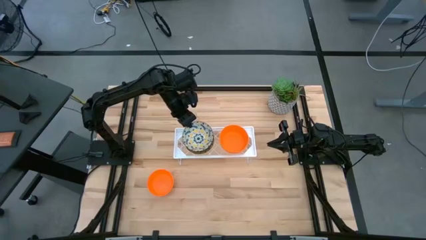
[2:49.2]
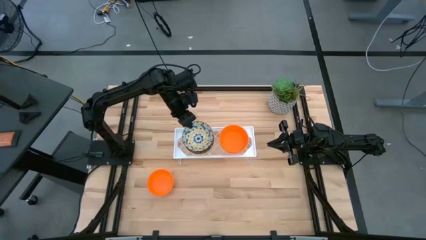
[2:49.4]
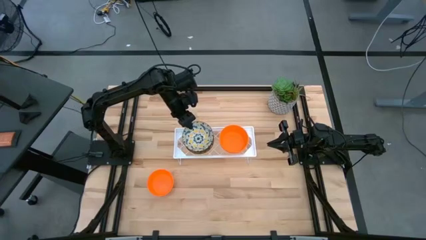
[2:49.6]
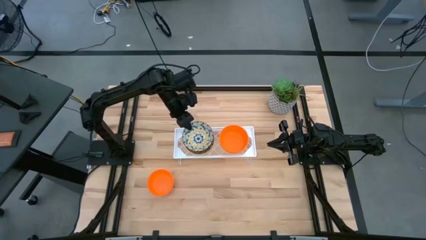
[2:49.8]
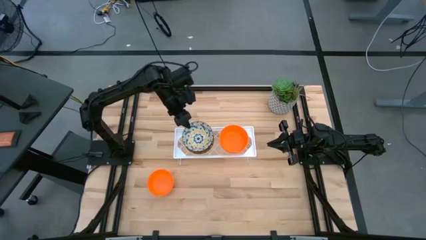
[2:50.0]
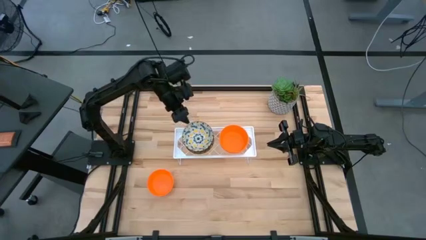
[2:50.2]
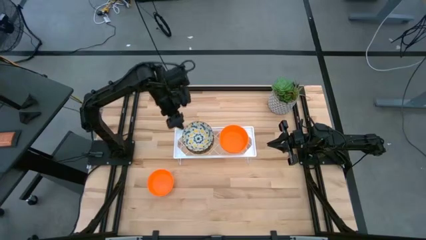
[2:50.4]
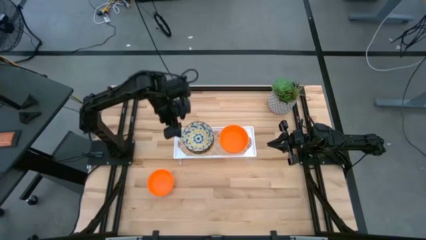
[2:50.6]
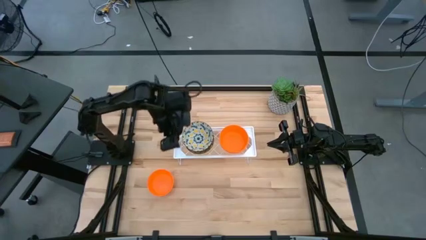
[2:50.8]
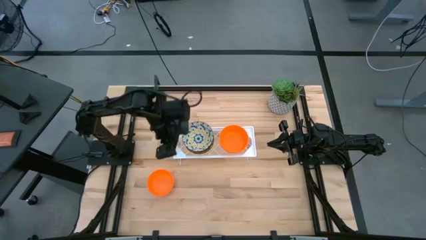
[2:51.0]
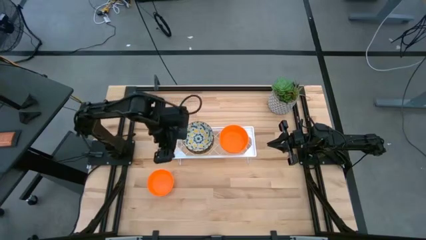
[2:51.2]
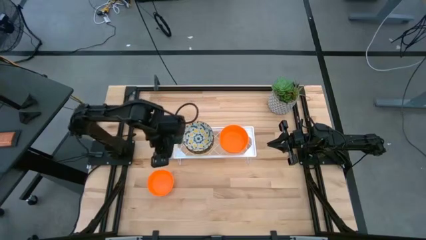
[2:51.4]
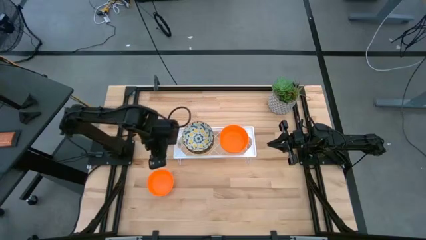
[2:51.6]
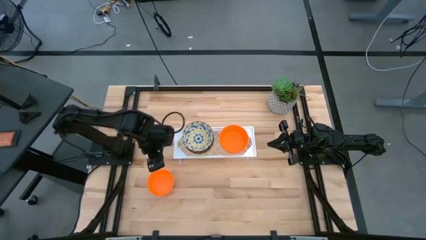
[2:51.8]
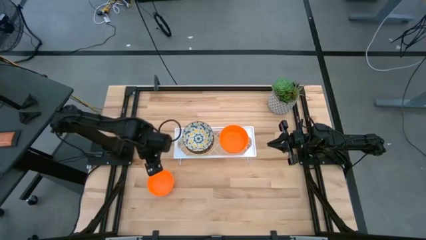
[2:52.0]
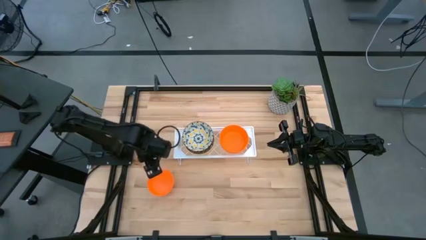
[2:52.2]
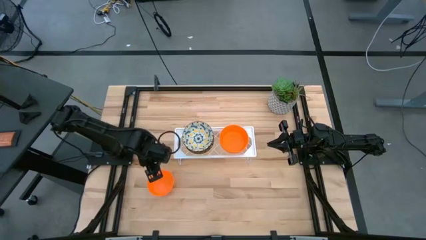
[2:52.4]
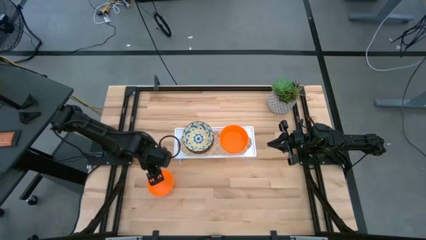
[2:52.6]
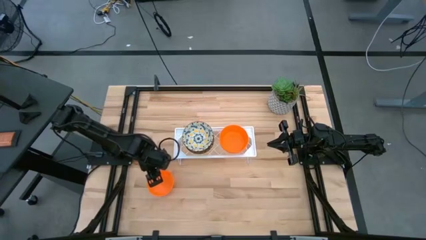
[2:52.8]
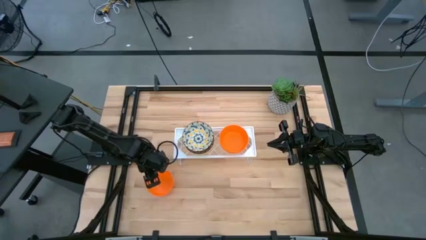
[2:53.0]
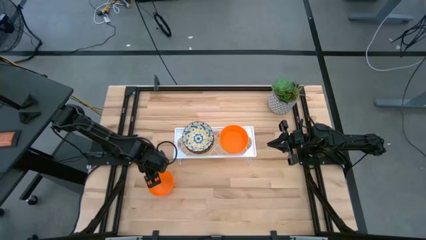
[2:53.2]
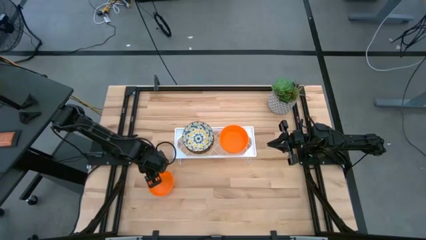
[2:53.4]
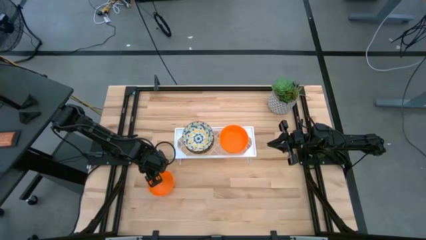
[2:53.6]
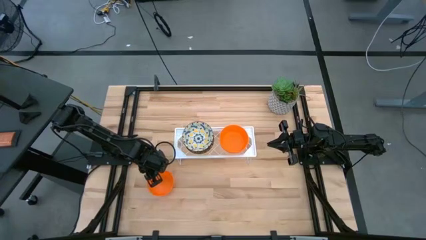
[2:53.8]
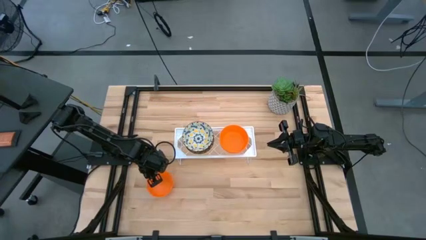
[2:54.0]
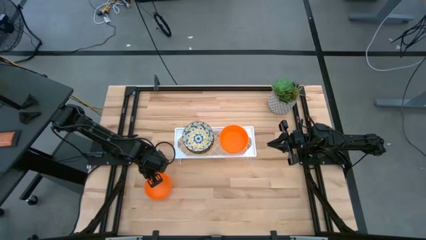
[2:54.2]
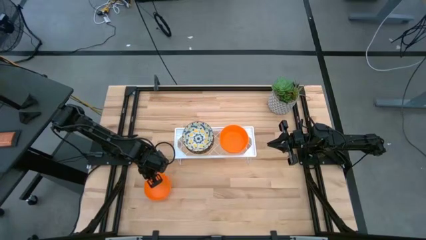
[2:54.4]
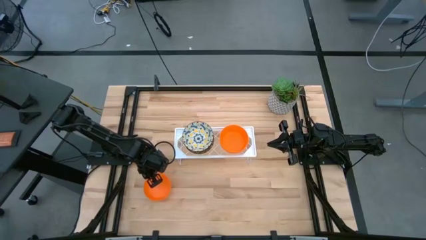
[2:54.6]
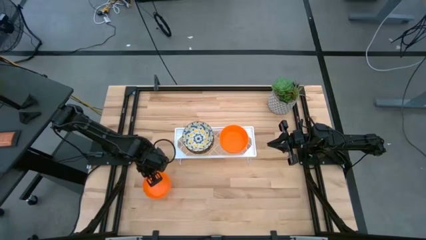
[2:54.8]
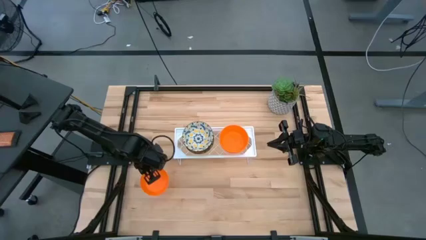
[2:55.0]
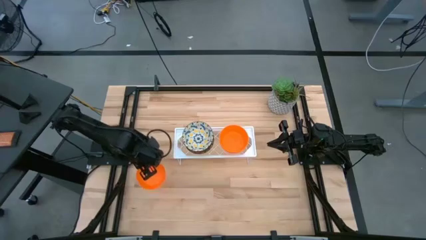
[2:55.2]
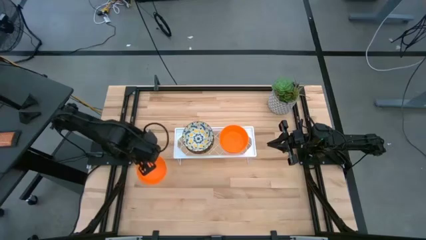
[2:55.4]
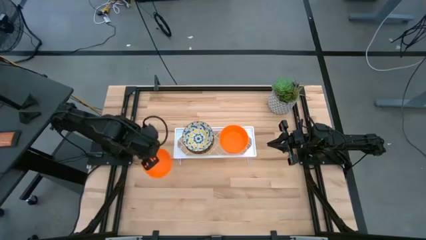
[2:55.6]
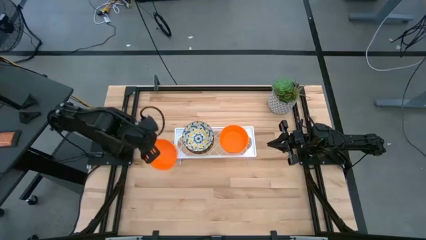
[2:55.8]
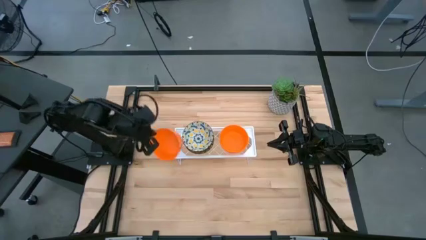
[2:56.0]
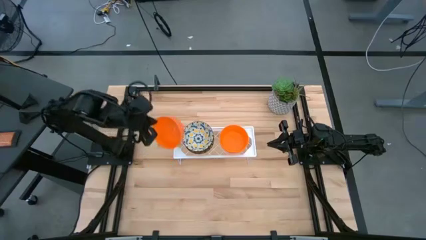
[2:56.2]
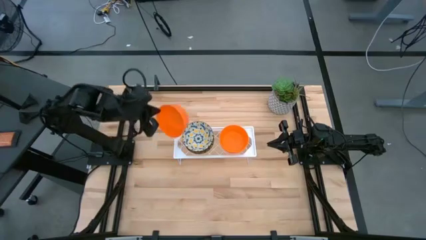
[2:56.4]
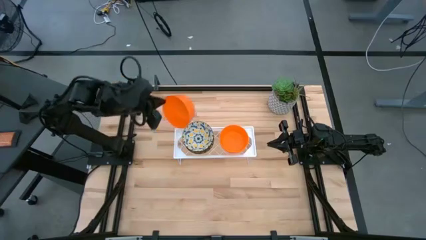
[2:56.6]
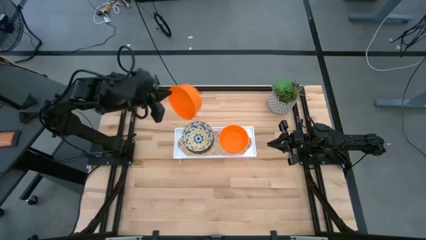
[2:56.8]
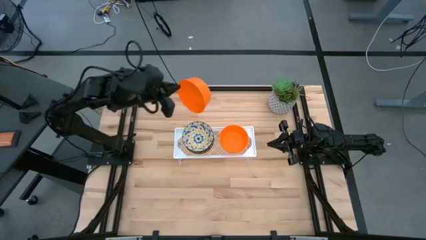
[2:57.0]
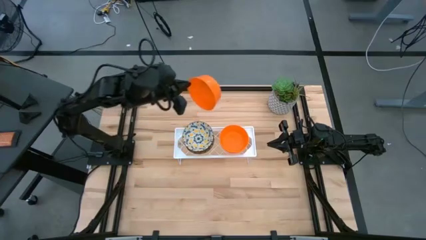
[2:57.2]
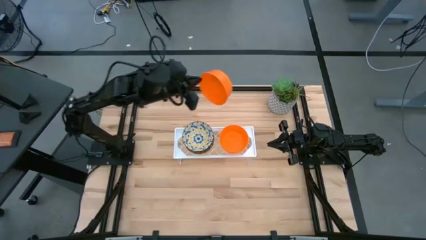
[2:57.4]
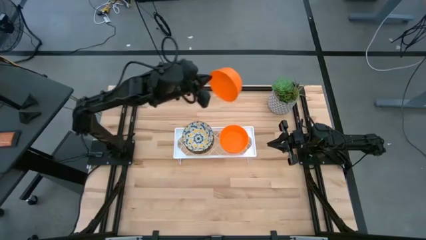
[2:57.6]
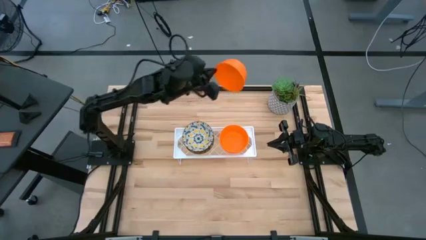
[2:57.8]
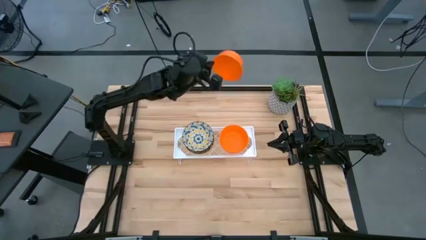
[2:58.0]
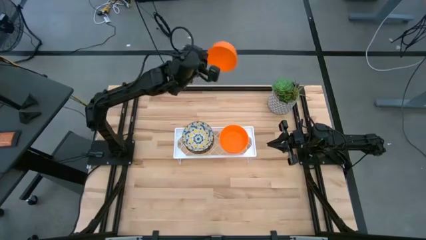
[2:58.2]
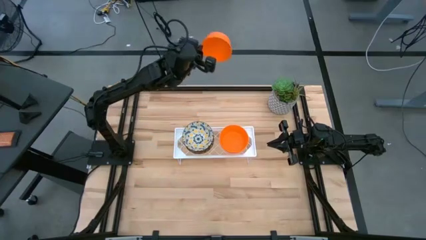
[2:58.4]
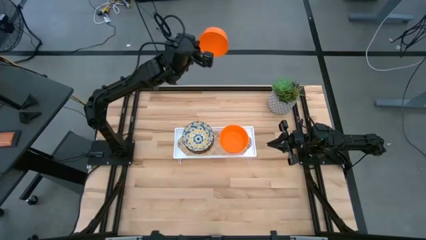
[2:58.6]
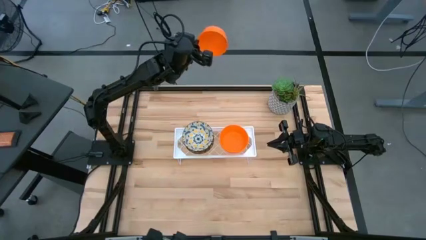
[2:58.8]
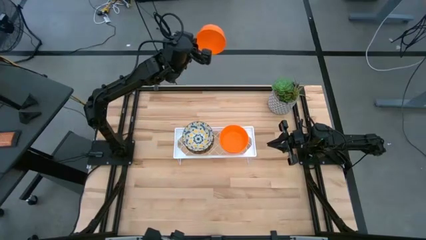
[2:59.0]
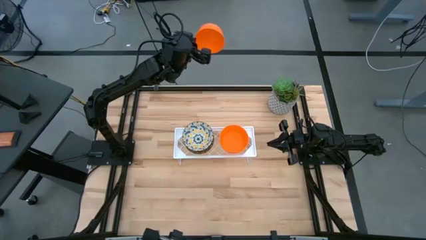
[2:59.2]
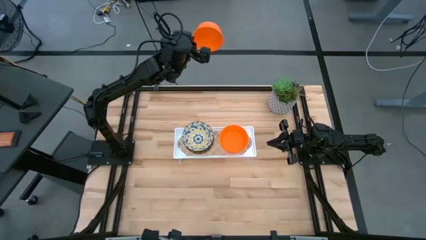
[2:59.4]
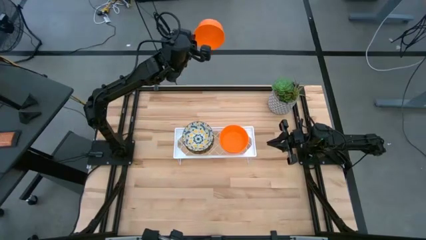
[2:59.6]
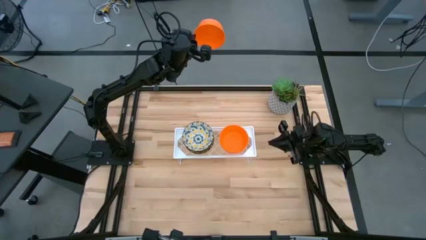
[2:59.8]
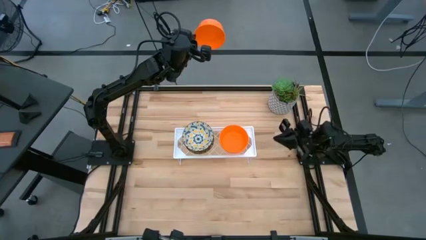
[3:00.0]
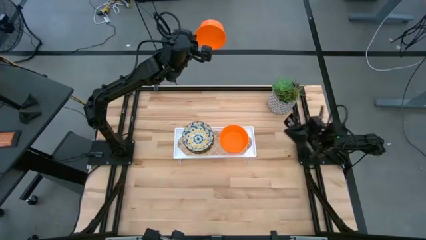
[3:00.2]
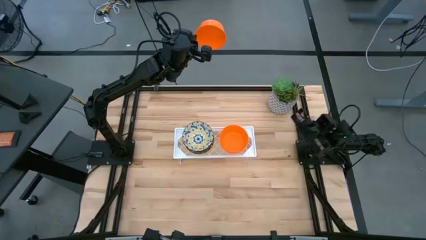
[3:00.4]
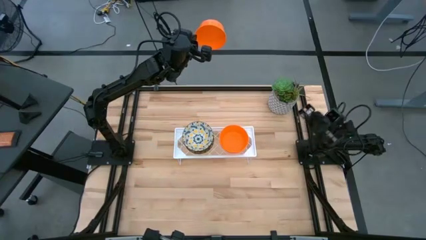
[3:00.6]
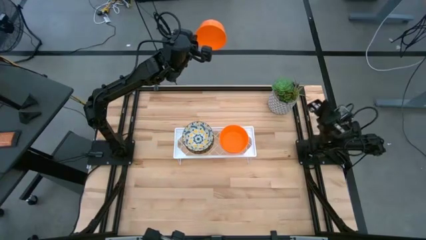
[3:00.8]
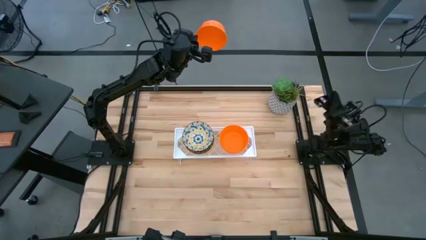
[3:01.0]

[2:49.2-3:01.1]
Task: Pick & Place Mini bowls
Stack the orange bowl on the orange bowl on the shelf
